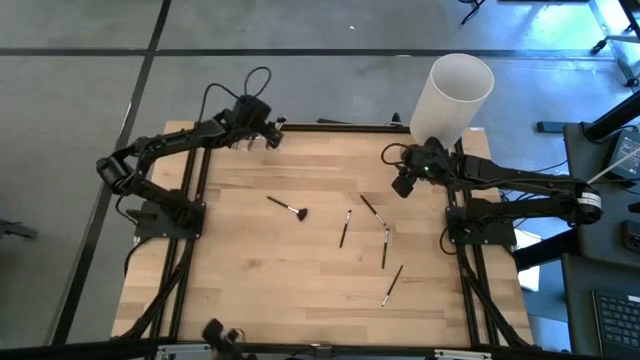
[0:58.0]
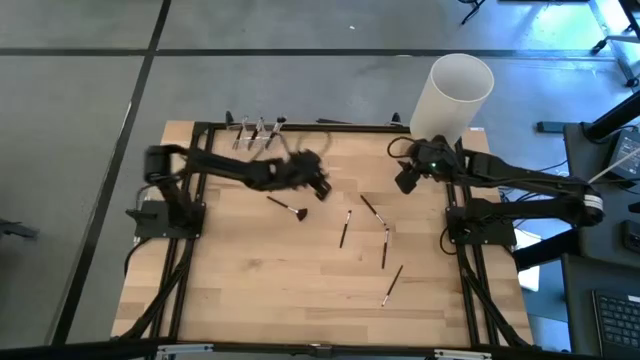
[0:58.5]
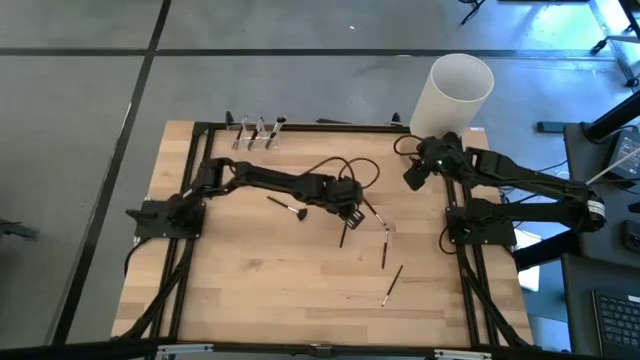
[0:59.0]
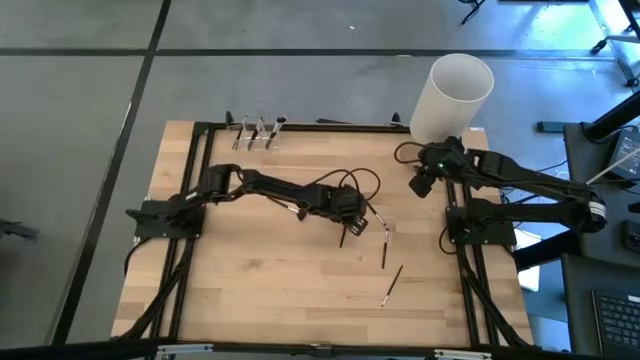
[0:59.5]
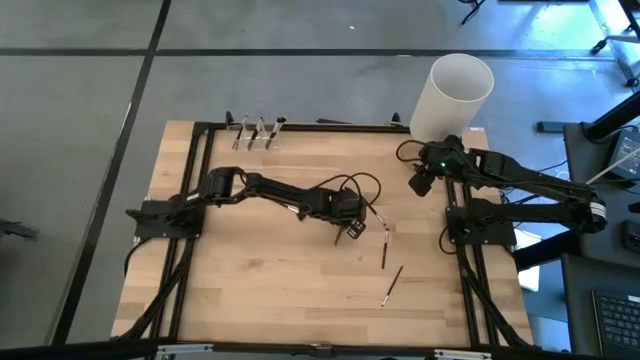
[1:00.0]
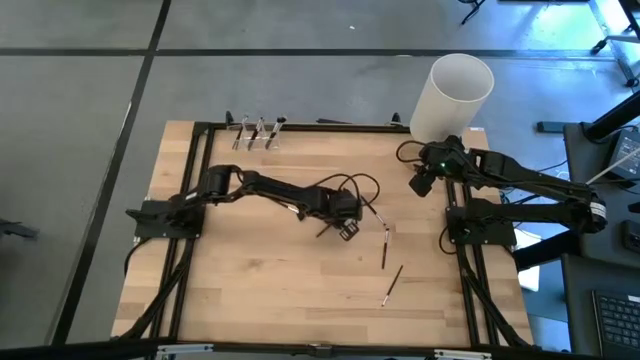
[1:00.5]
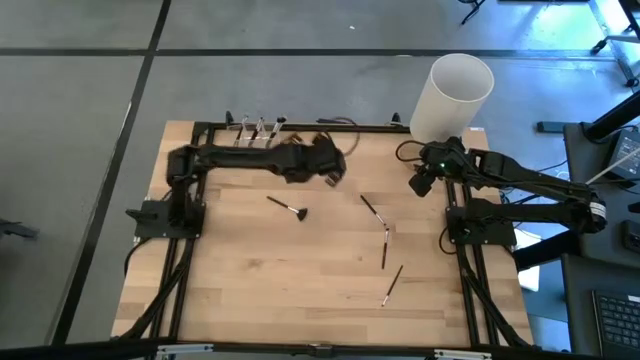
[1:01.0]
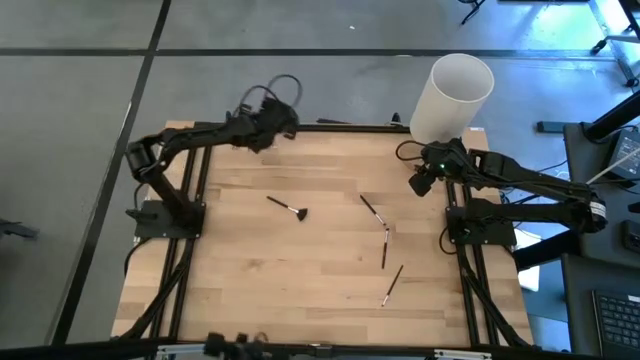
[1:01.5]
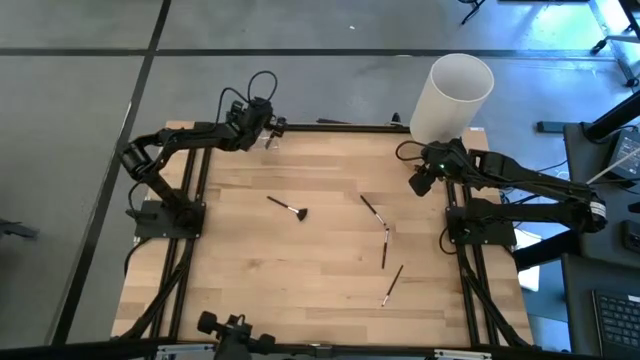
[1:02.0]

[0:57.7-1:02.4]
Task: Put items in baskets/containers
Put the black eyeshadow brush into the transparent organizer

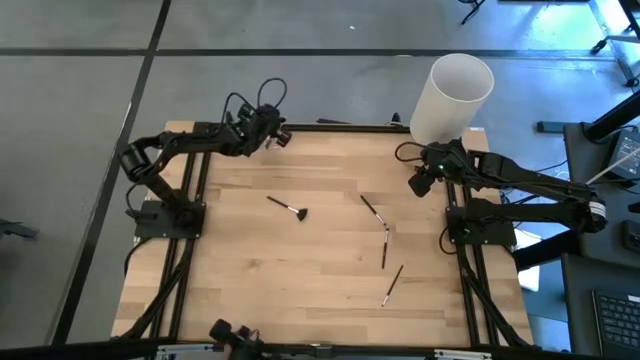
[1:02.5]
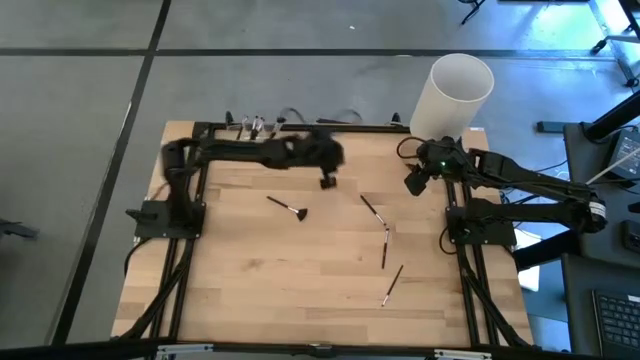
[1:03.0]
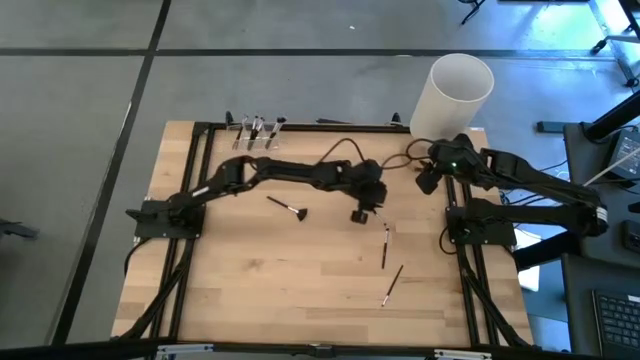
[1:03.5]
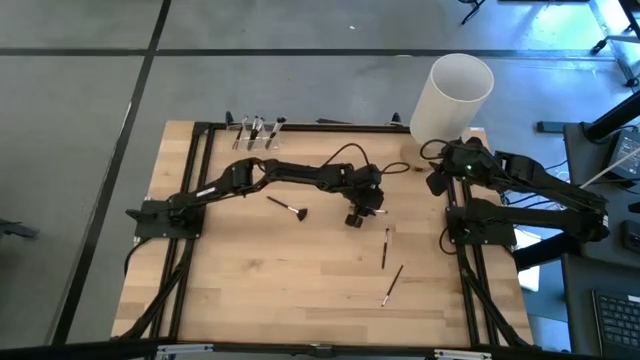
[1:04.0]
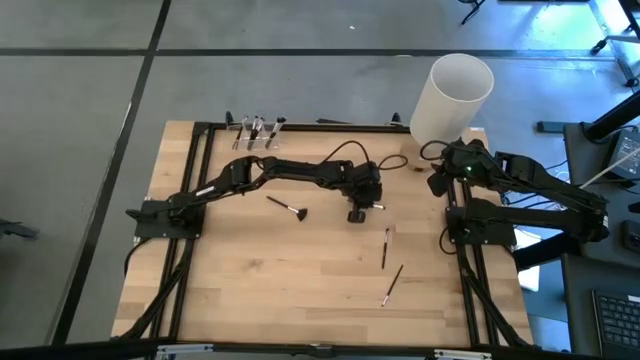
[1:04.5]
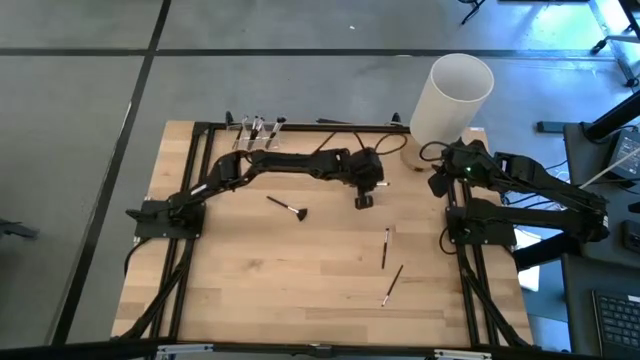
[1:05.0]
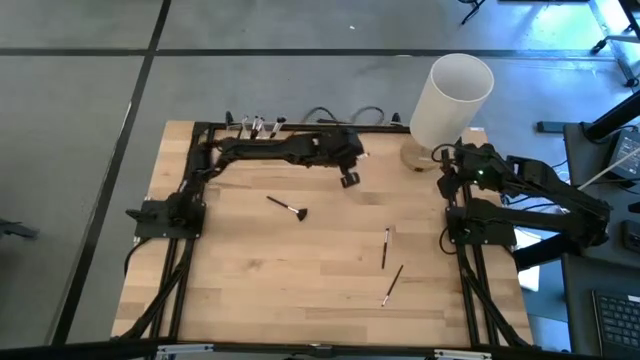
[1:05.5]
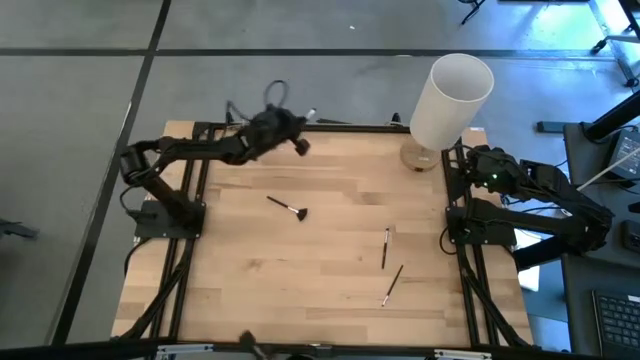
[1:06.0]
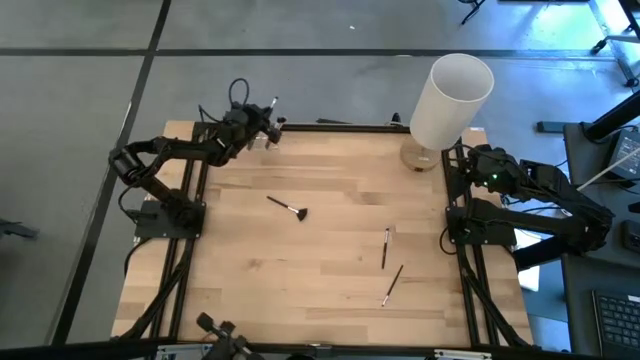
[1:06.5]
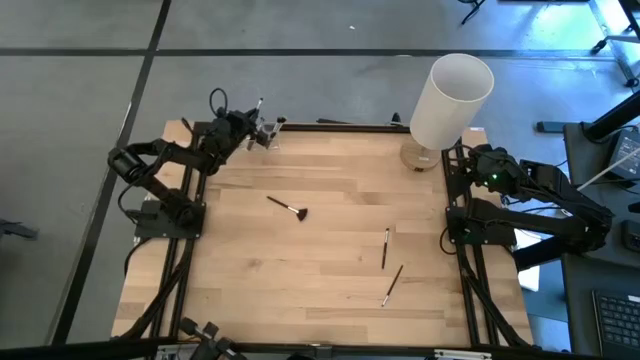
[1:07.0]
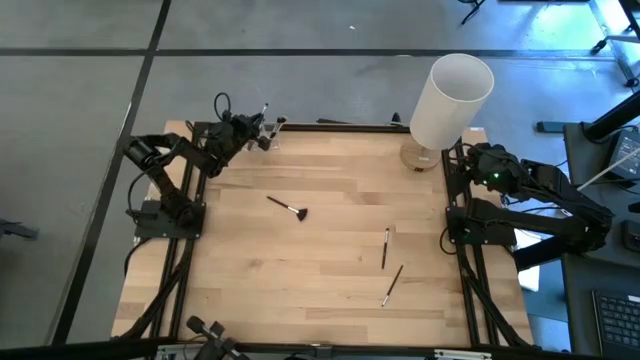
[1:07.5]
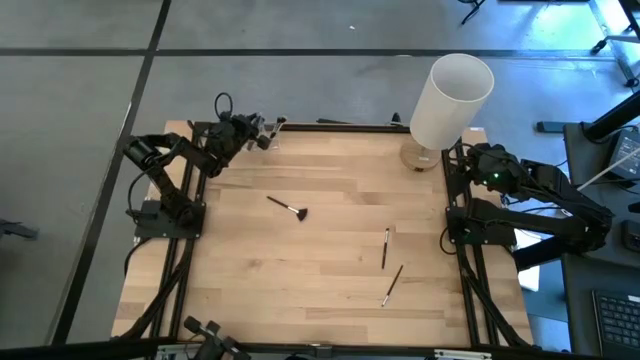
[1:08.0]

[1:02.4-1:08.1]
Put the black eyeshadow brush into the transparent organizer

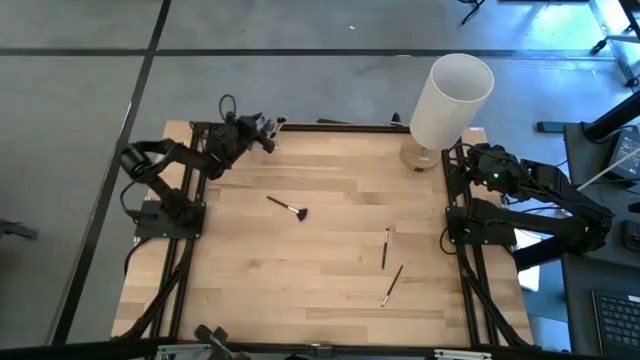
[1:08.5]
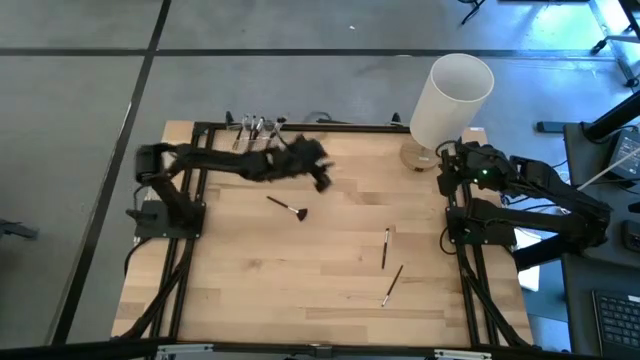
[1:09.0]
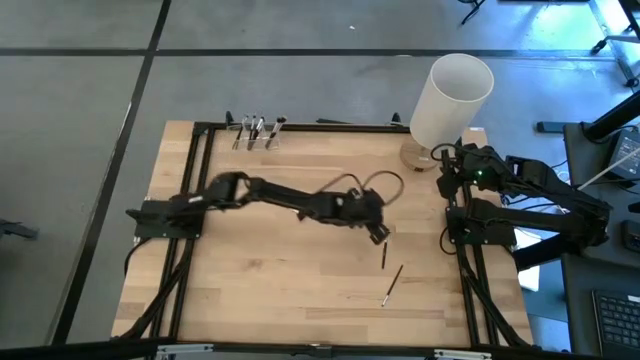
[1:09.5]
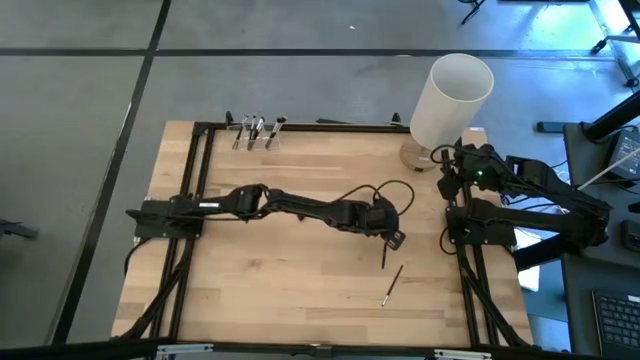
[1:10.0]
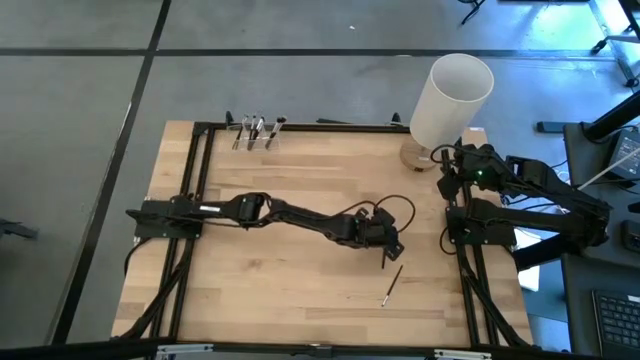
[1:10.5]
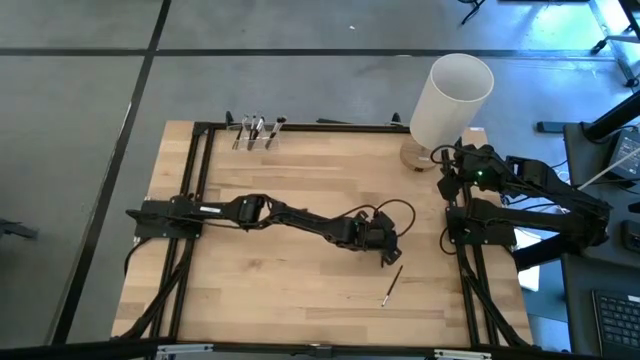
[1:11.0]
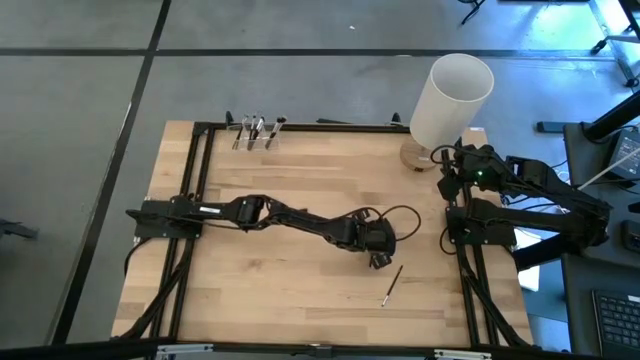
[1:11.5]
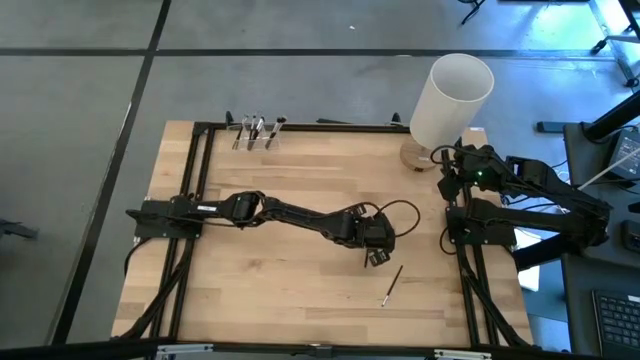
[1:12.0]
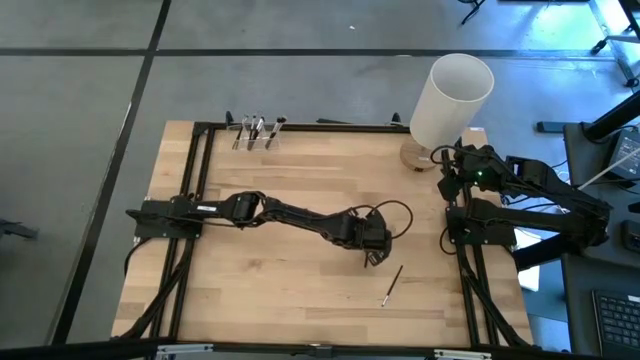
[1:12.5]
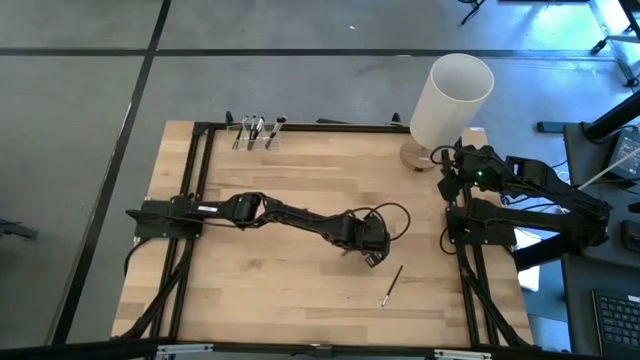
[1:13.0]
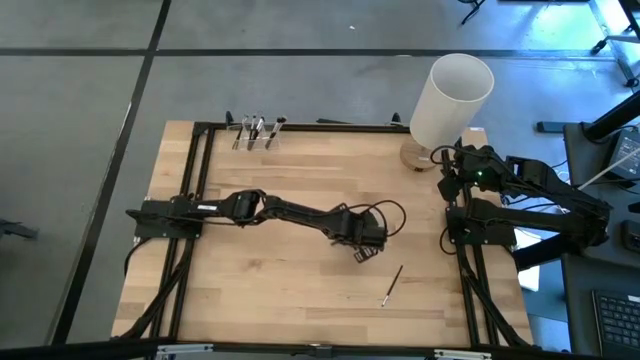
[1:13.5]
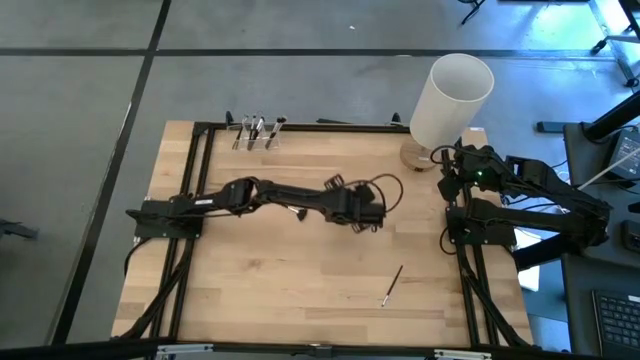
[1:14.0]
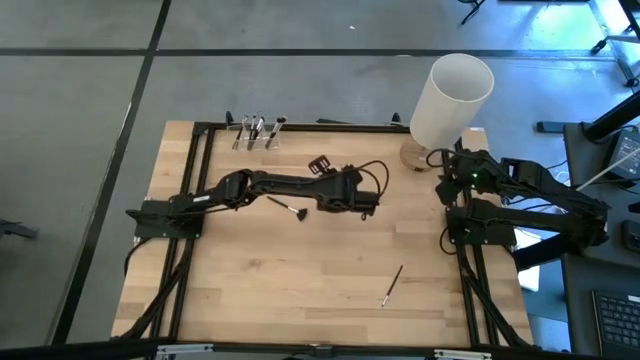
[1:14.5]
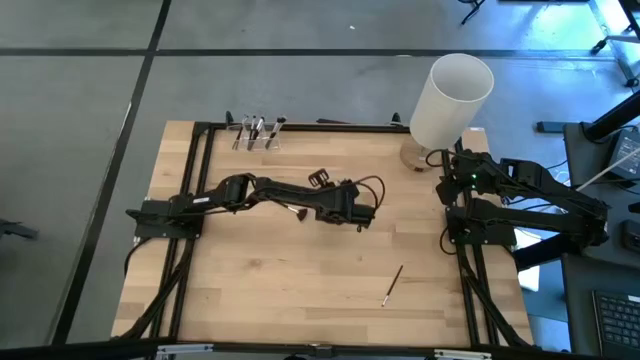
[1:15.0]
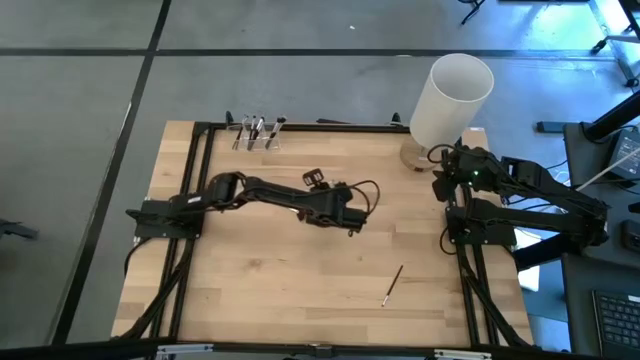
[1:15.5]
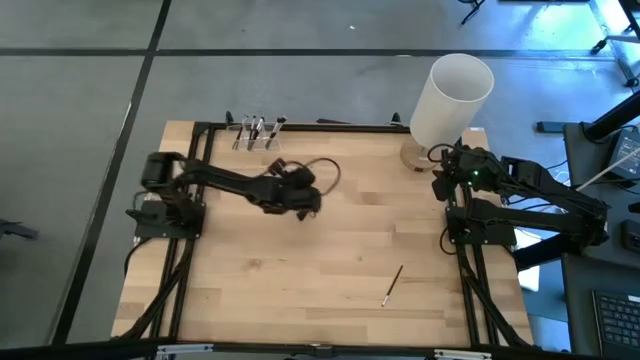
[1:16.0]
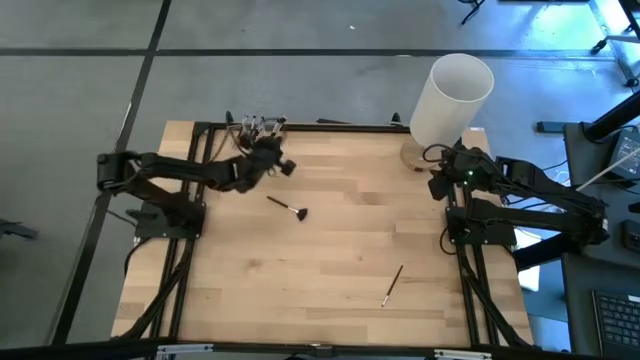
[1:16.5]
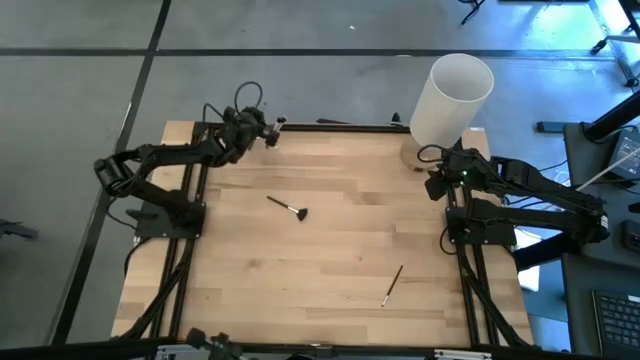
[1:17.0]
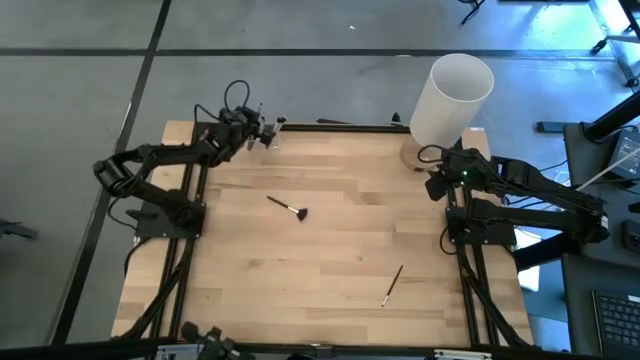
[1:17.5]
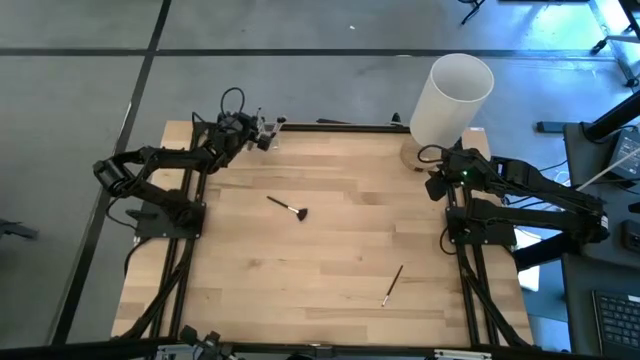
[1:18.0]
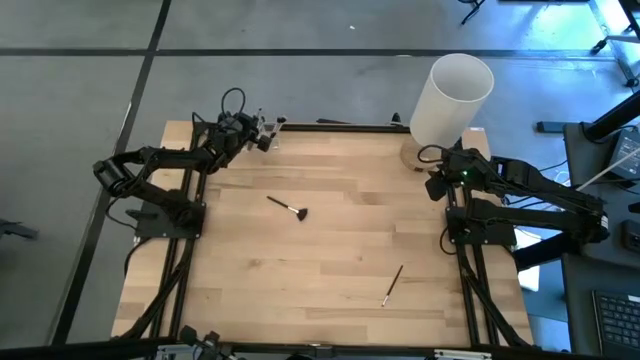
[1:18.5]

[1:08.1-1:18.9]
Put the black eyeshadow brush into the transparent organizer

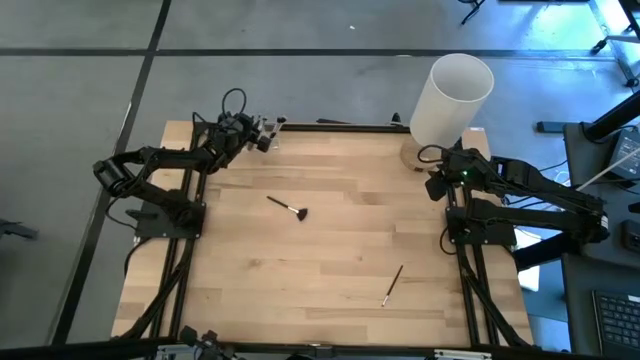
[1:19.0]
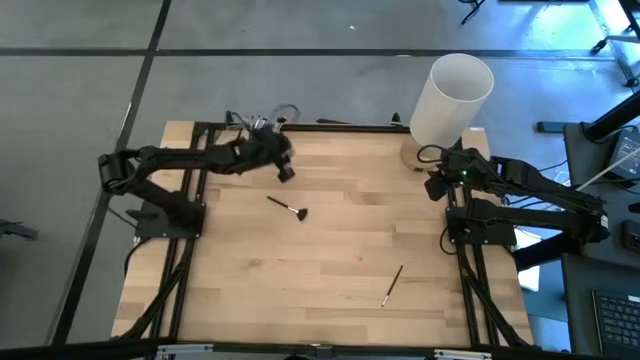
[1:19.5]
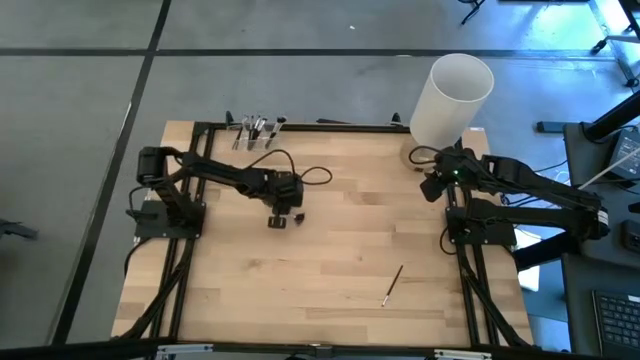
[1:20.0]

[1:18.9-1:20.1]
Put the black highlighter brush into the transparent organizer
